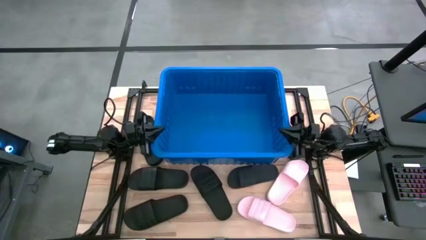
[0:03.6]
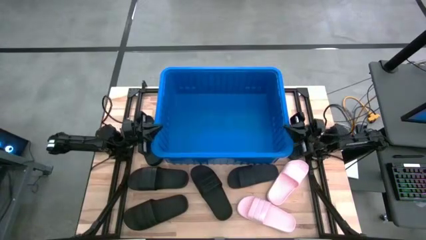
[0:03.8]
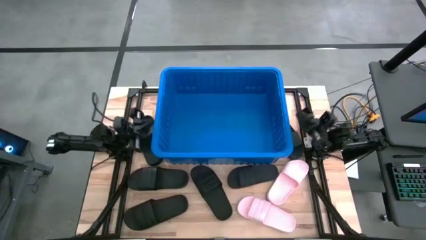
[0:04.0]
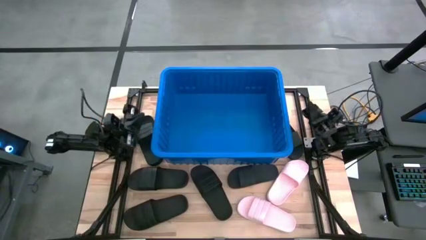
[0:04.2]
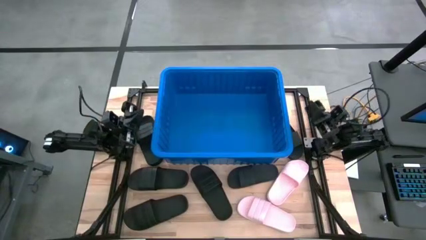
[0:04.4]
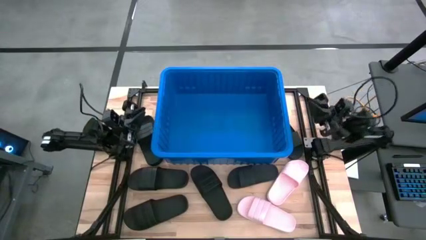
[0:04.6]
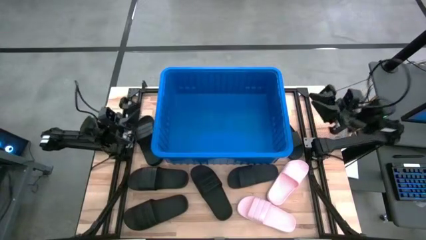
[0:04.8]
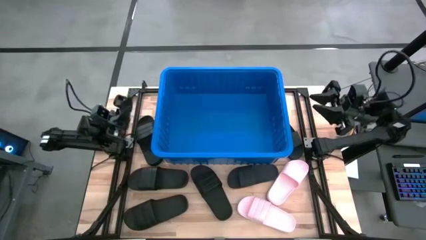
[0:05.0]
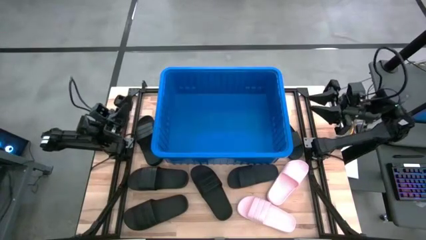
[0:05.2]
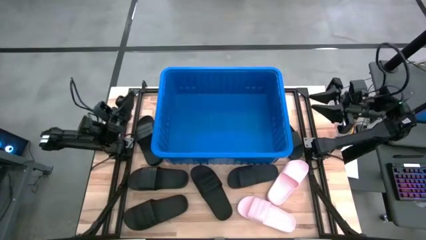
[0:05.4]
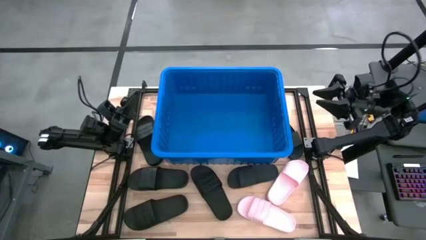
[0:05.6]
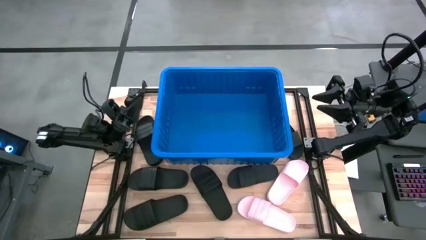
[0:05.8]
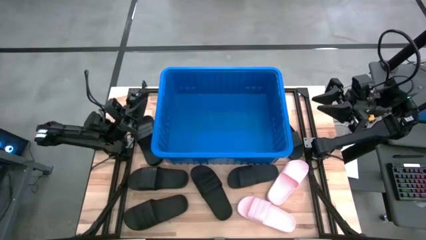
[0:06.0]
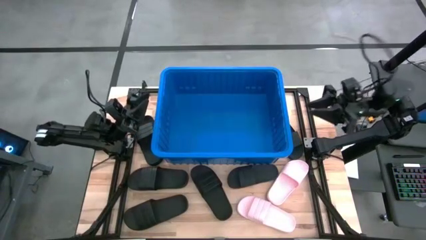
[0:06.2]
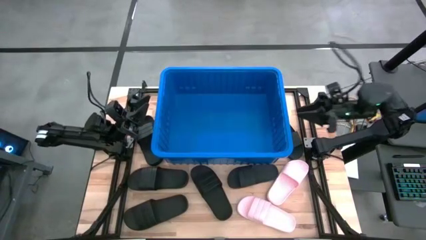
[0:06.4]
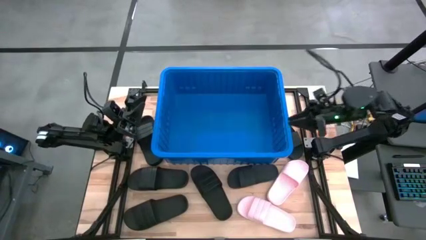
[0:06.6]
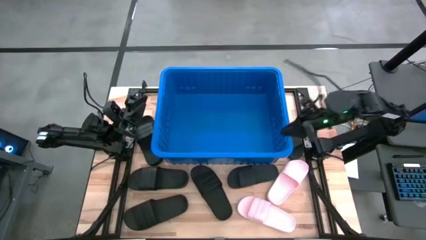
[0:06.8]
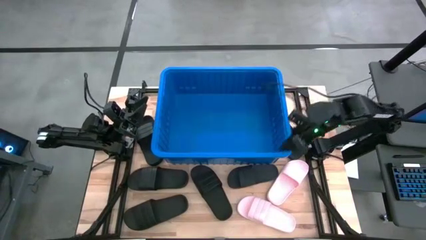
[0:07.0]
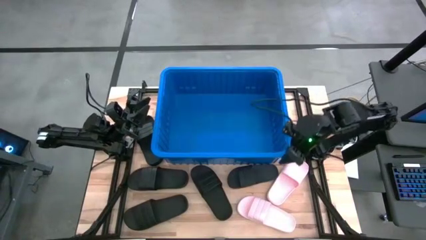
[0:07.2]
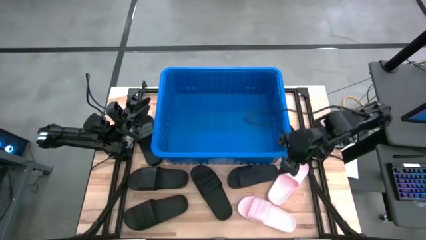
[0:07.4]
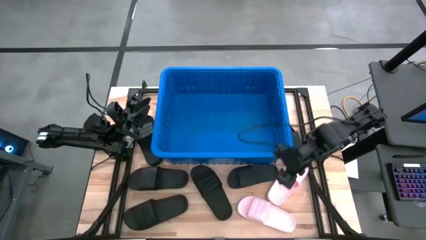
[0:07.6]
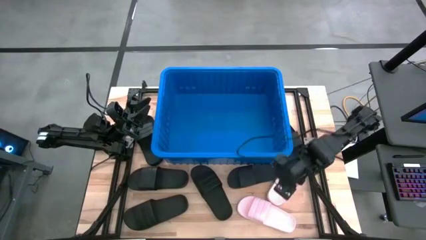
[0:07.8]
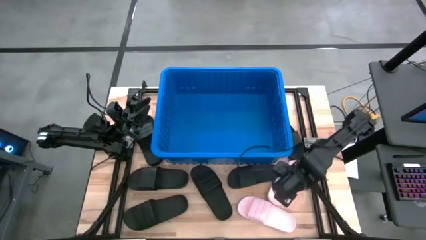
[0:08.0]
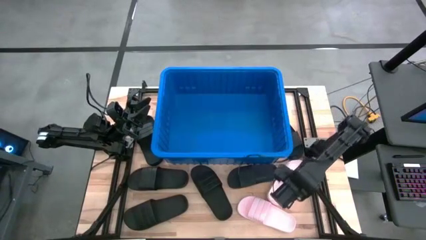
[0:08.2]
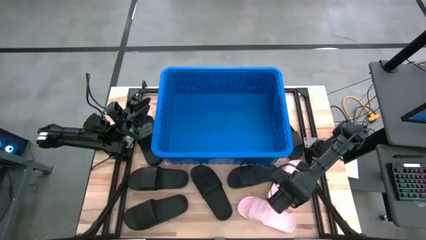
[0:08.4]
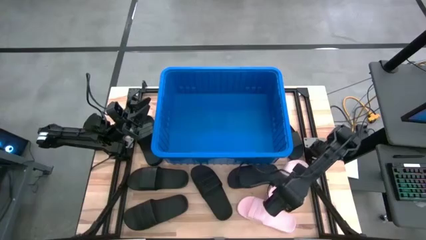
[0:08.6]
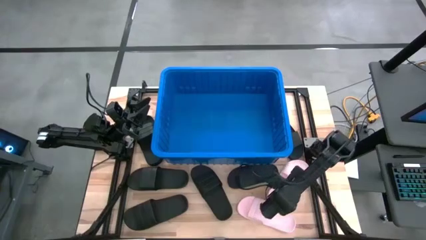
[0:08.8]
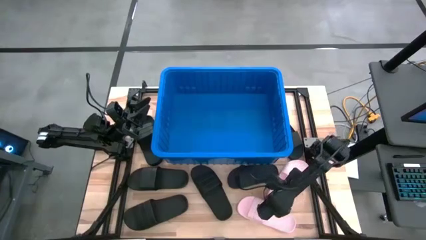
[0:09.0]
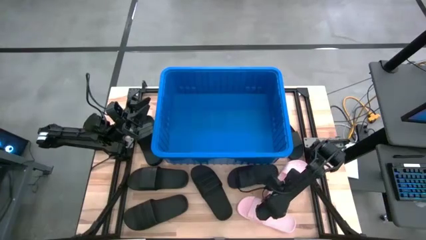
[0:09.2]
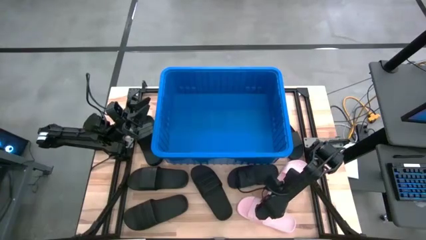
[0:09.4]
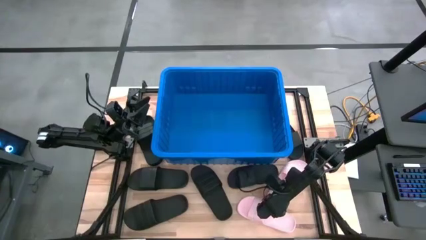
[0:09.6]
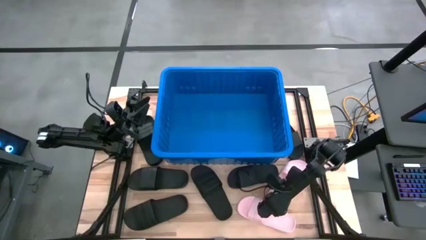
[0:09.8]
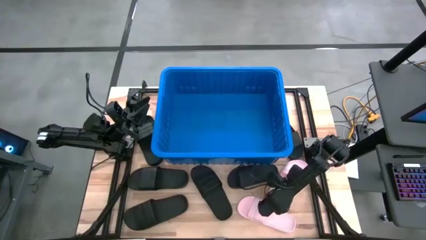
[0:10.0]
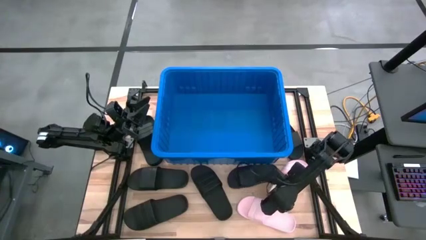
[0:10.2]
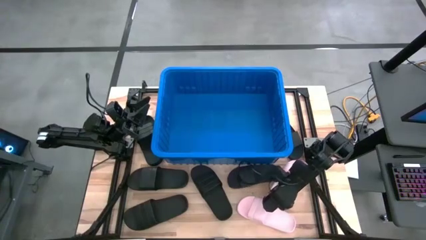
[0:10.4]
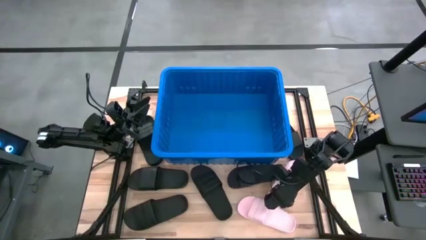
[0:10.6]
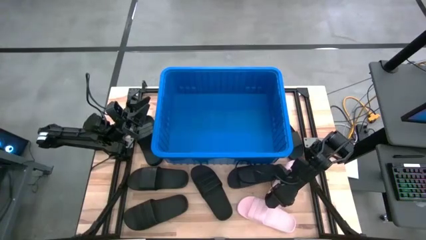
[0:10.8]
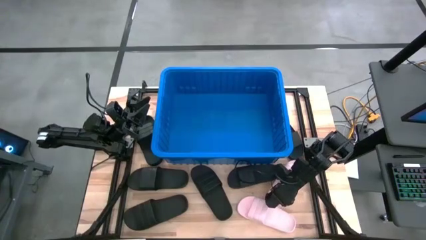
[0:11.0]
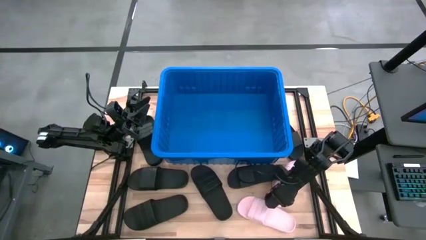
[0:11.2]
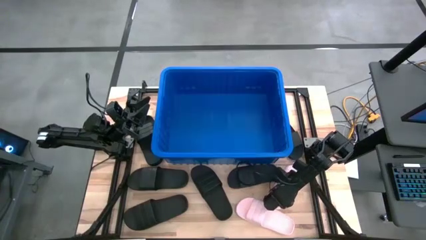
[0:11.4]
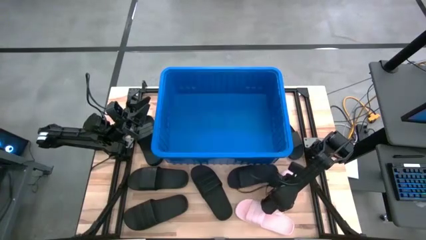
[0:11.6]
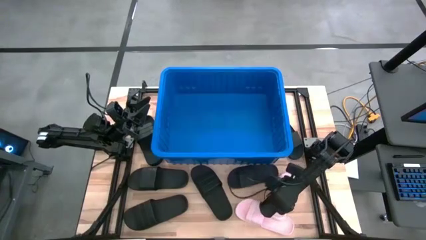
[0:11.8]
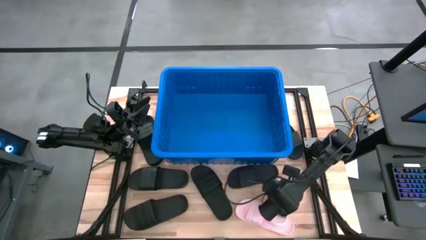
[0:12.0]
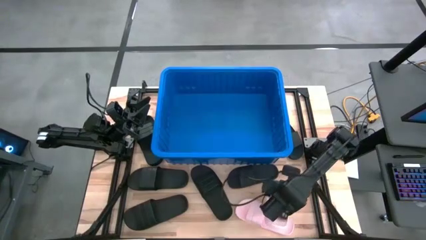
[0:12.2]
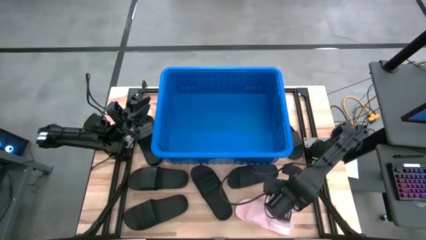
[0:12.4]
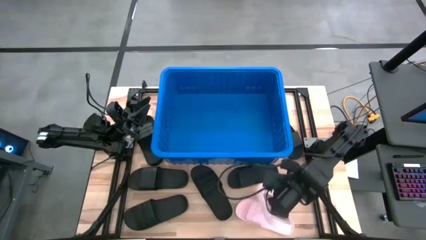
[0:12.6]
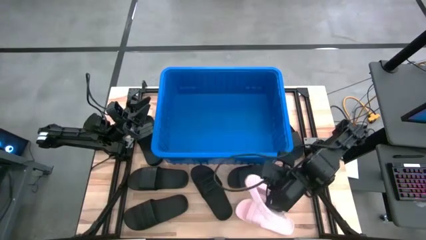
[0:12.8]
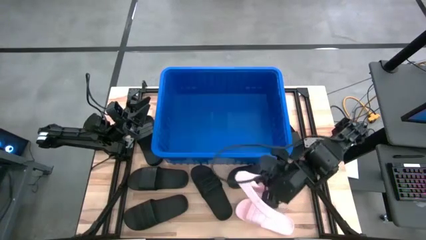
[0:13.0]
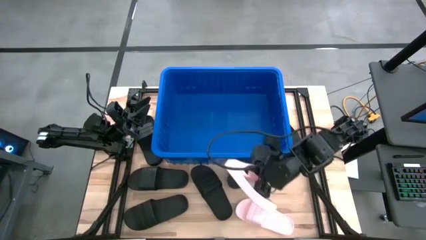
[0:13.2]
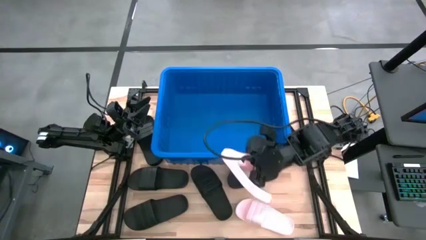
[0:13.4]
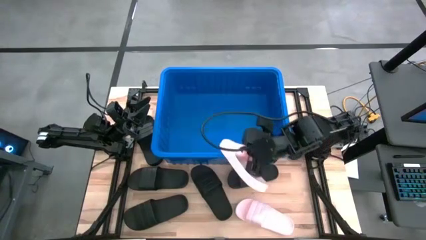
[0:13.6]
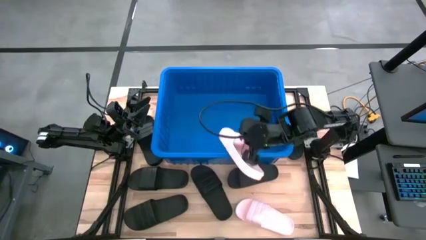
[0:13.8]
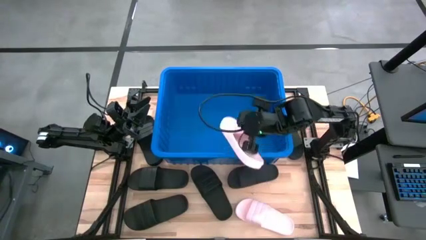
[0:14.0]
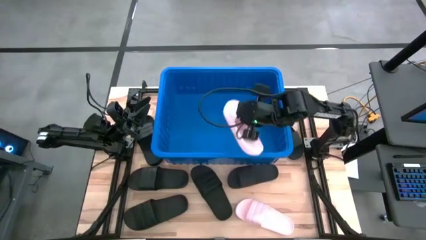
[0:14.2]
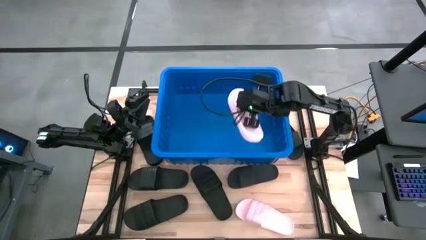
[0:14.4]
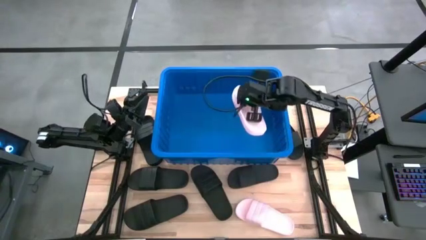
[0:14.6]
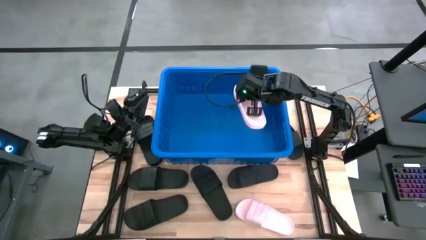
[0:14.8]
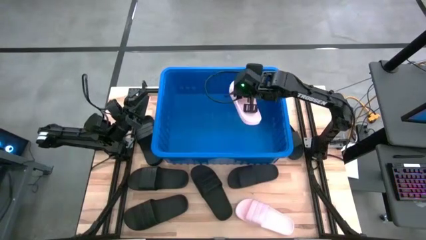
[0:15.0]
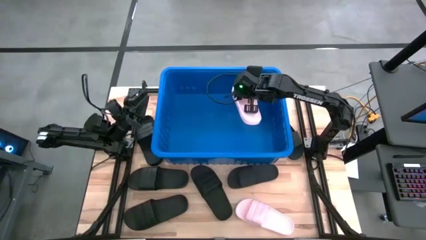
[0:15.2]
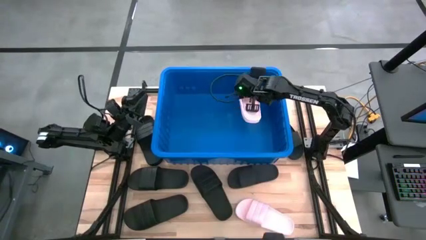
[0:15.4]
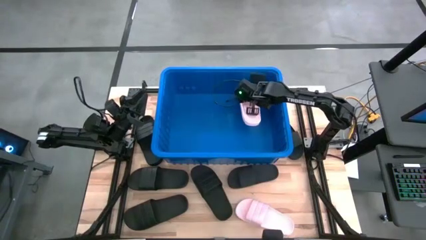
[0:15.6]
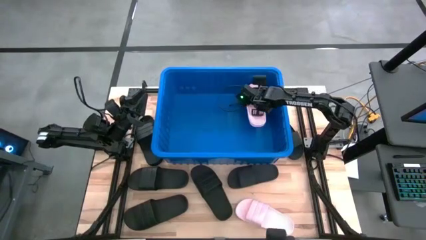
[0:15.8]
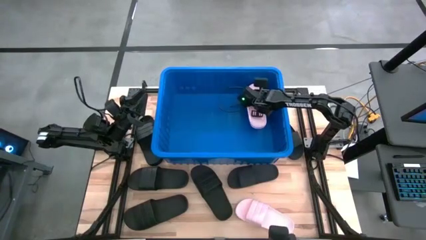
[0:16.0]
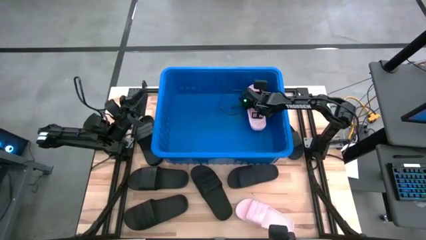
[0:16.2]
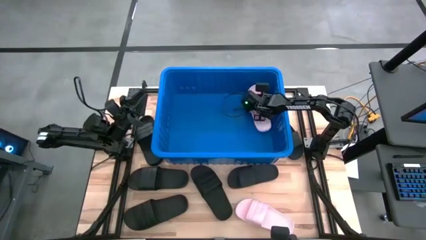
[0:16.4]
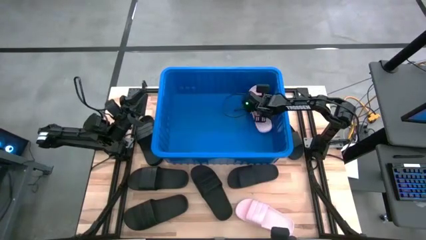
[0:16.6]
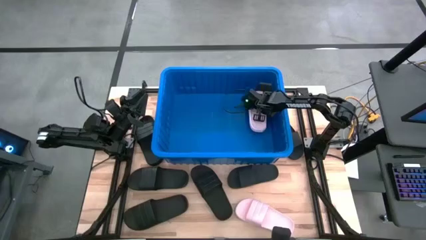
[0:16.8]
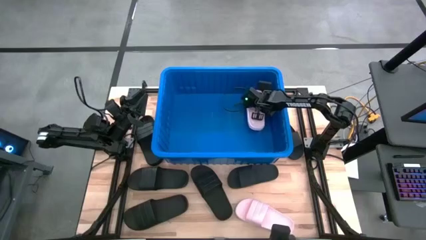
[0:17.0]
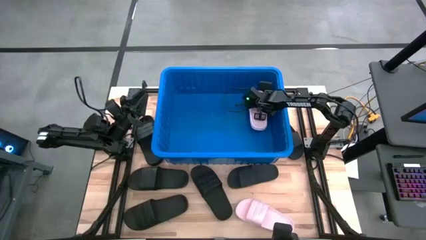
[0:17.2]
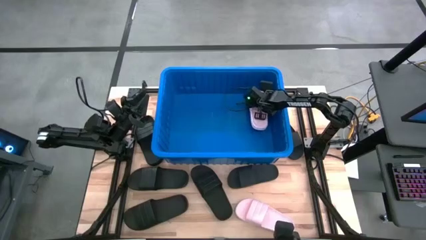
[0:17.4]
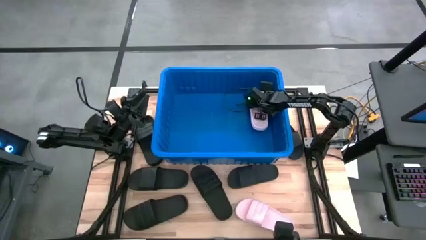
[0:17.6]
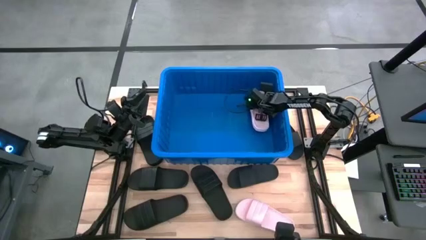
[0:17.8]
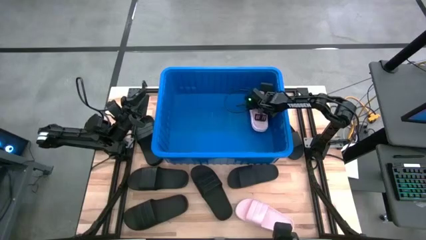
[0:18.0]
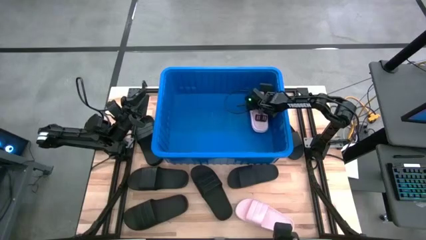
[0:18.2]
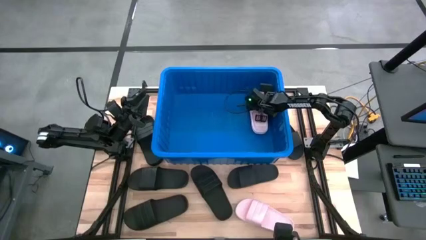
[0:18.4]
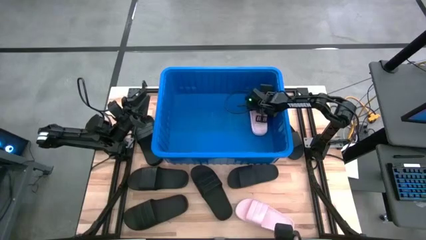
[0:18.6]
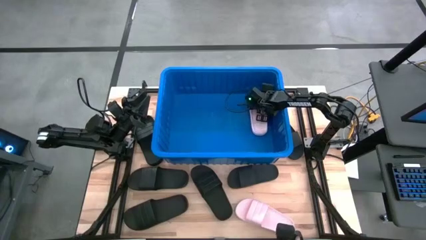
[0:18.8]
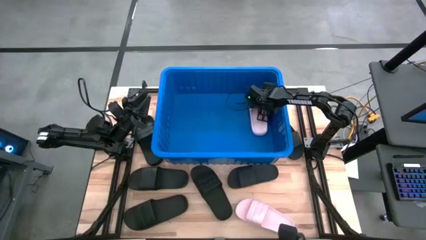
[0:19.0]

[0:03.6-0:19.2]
Task: Pick and place slides into bin
Put the pink slide into the blue bin
